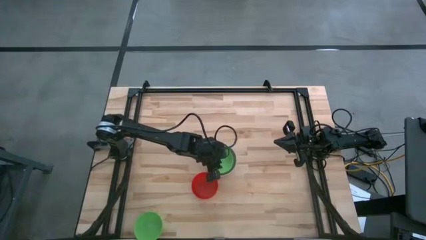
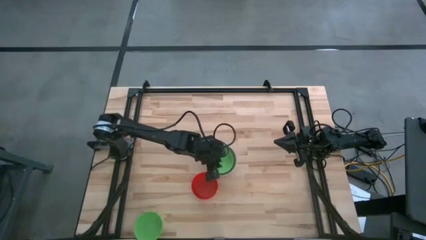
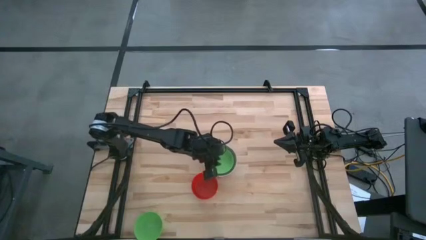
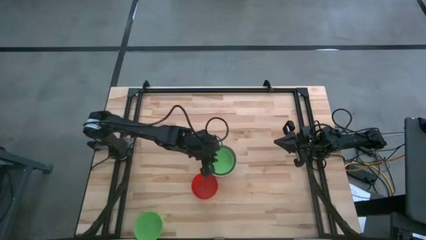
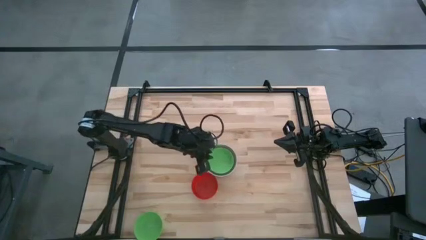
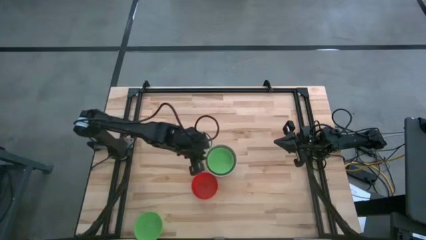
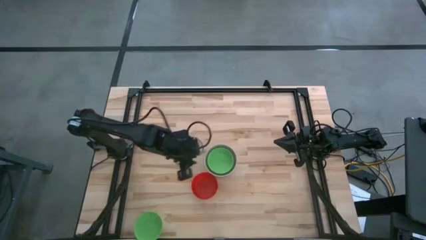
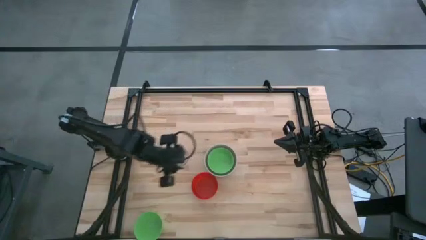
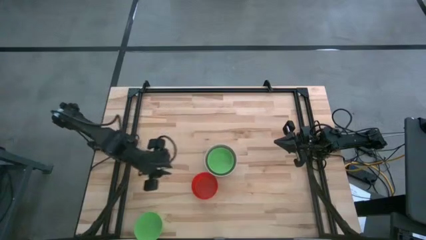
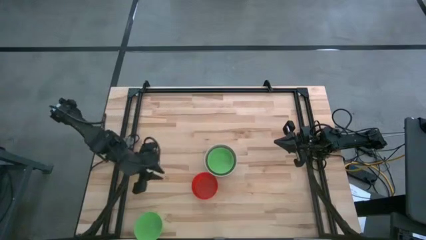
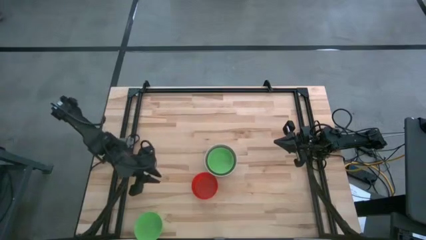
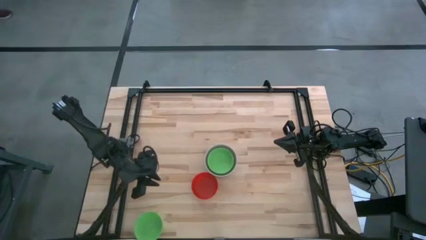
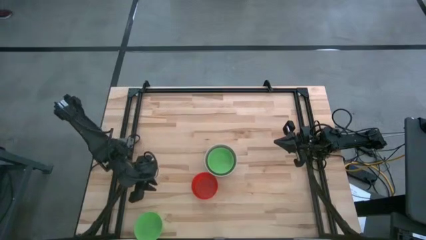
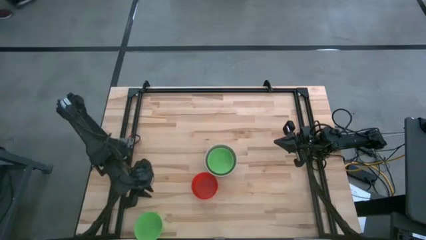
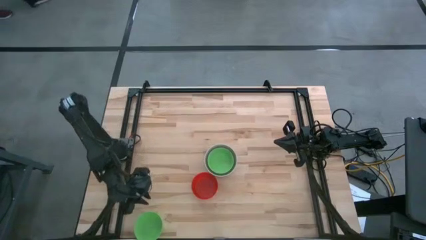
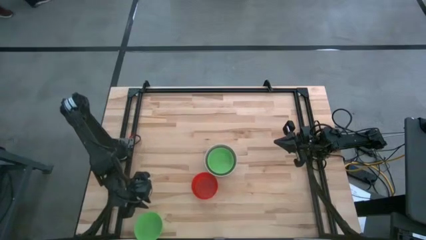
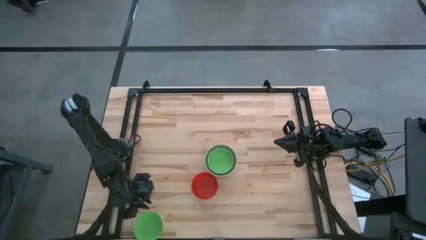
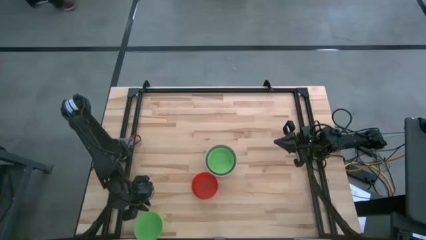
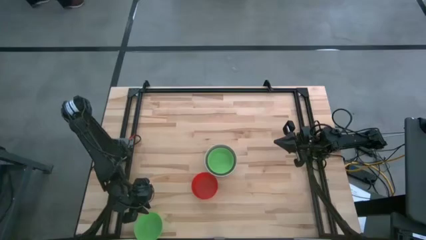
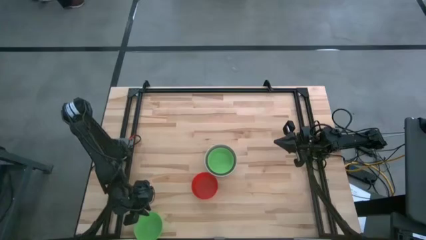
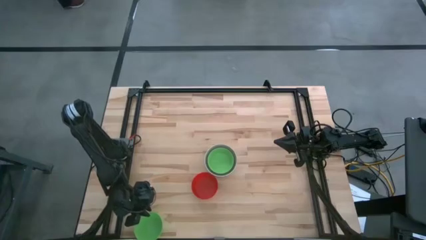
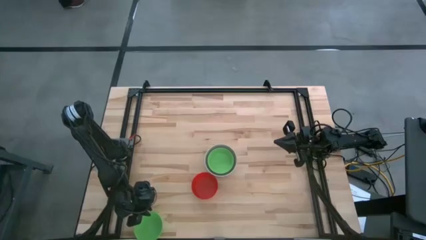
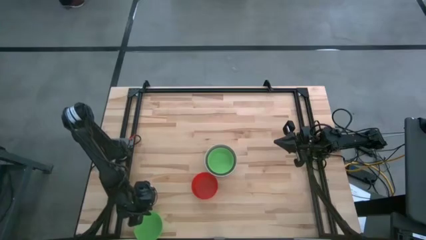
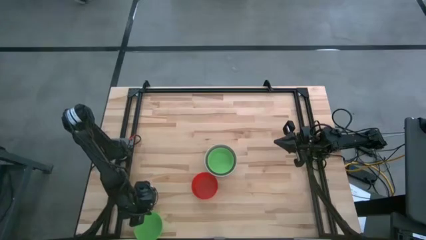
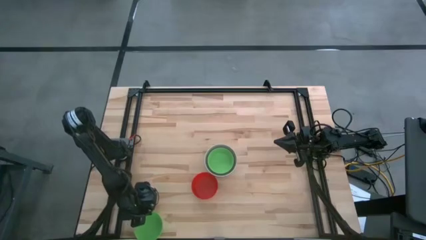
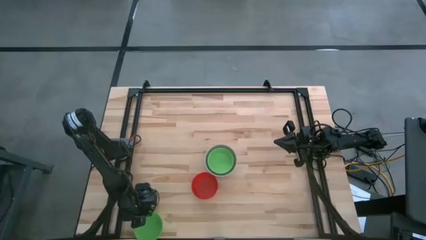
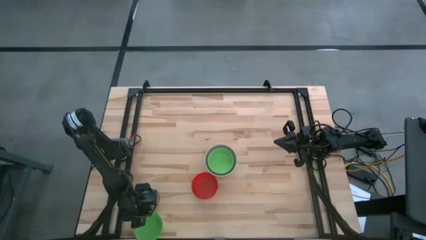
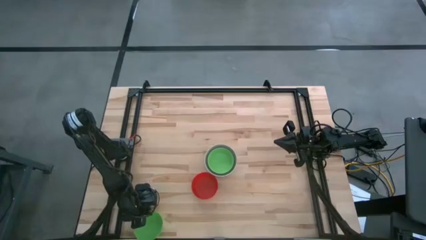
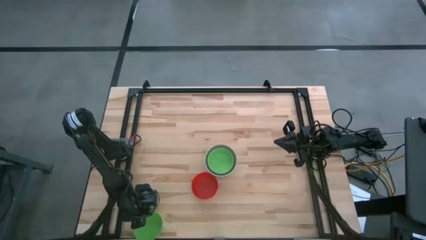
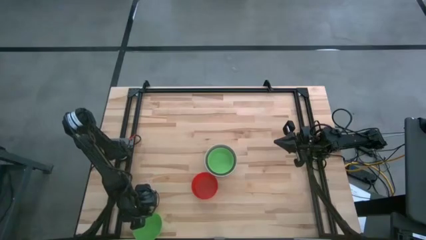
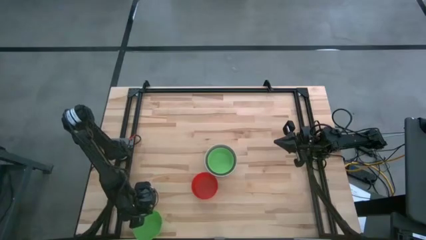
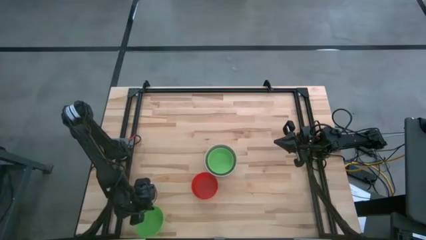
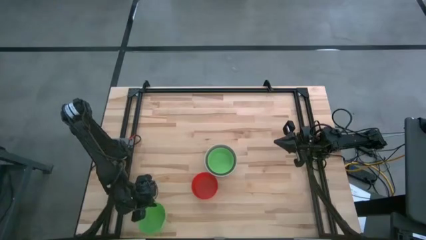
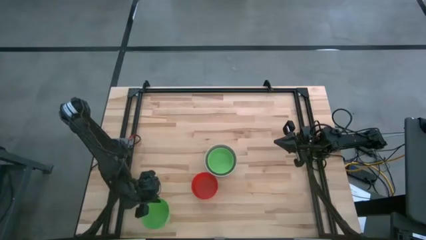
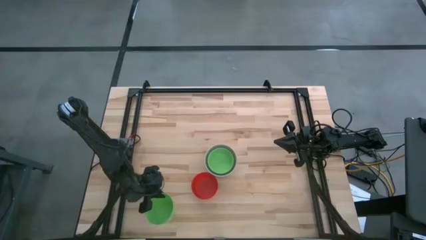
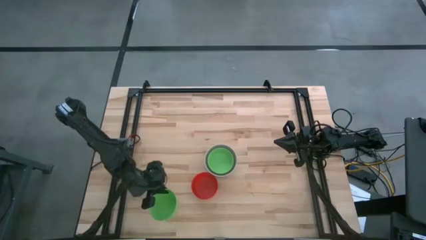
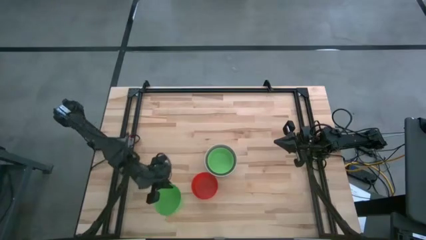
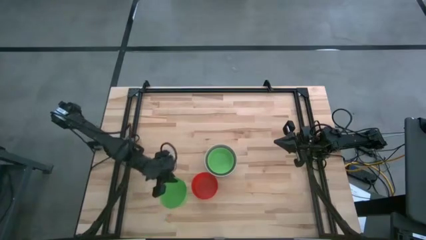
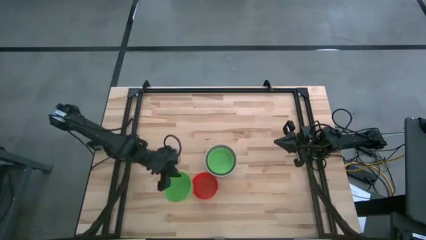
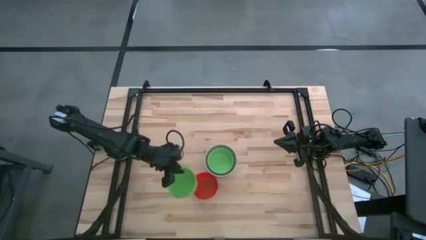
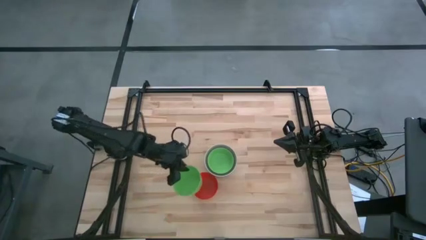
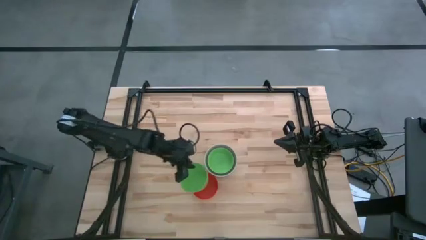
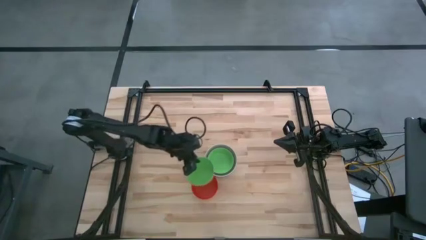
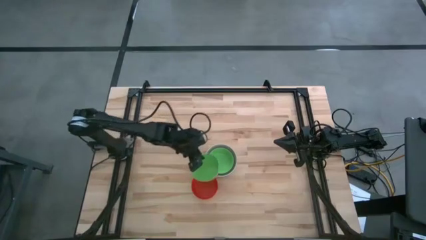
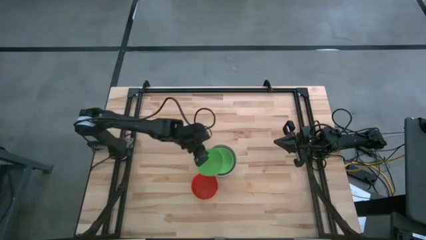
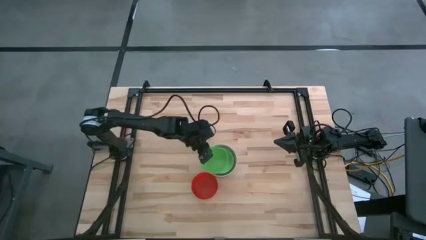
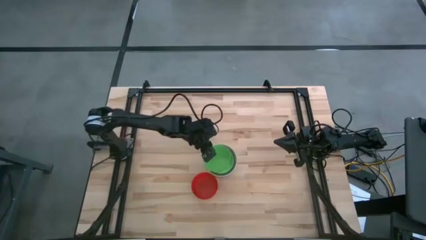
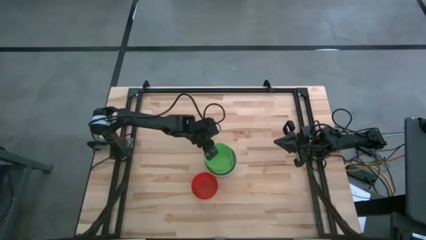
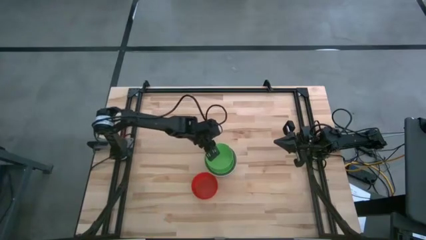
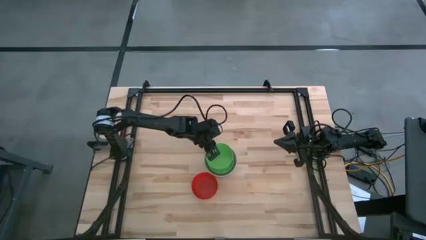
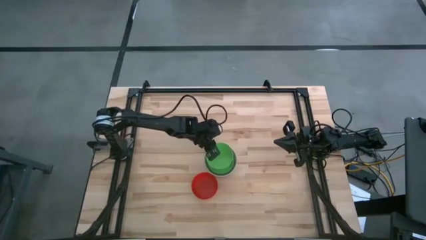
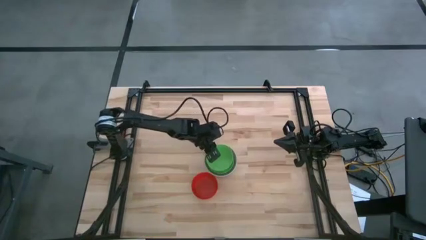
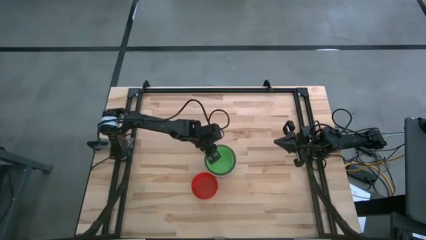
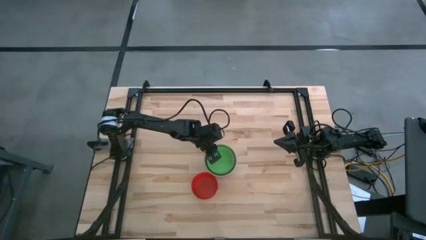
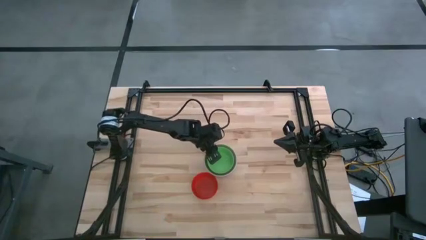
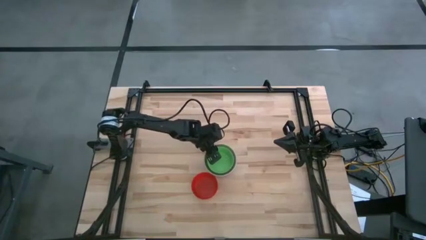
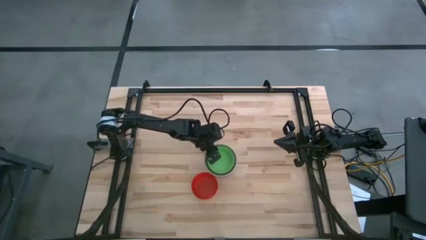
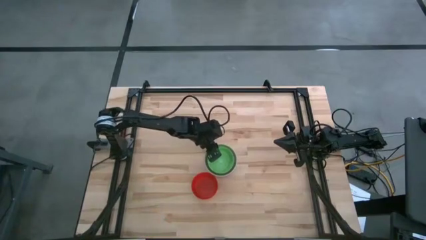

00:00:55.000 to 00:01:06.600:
Stack the bottom green bowl on the top green bowl
